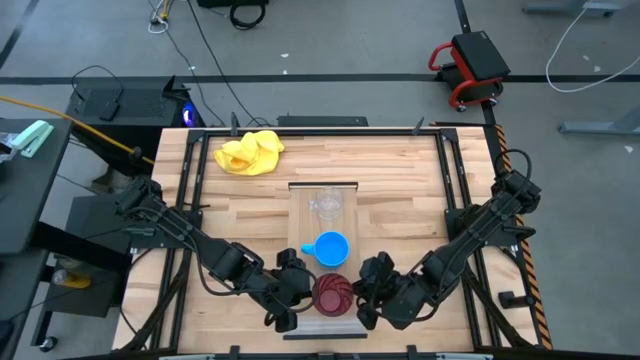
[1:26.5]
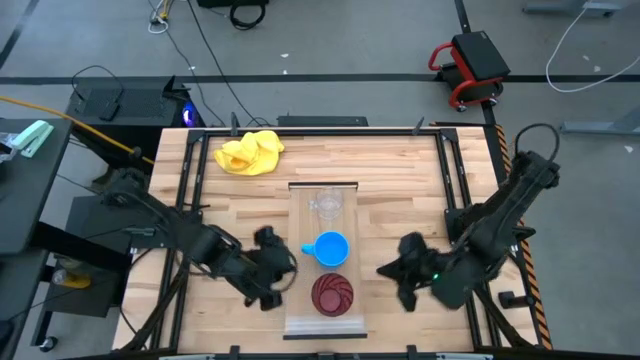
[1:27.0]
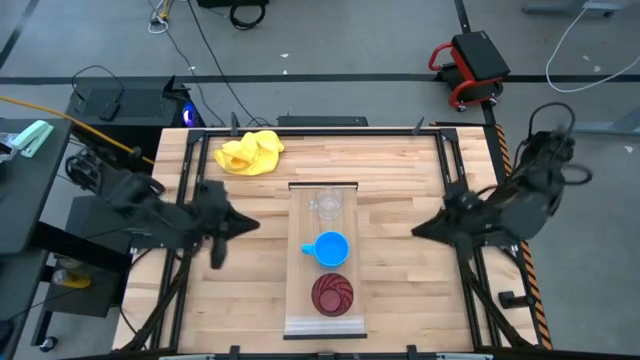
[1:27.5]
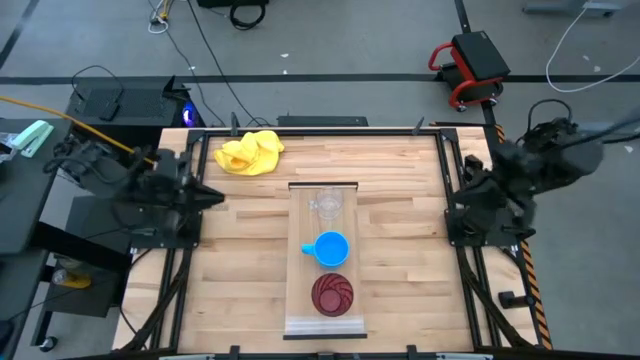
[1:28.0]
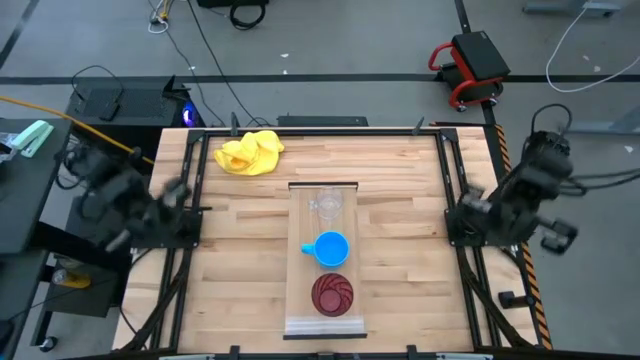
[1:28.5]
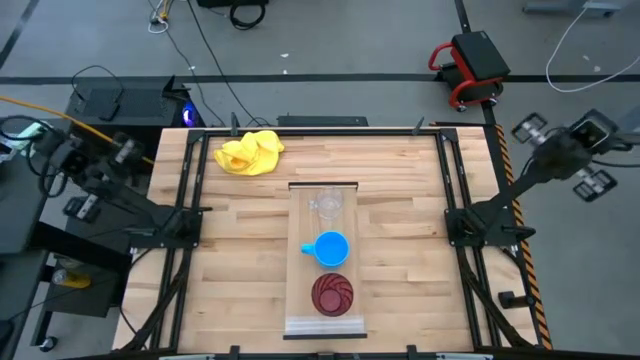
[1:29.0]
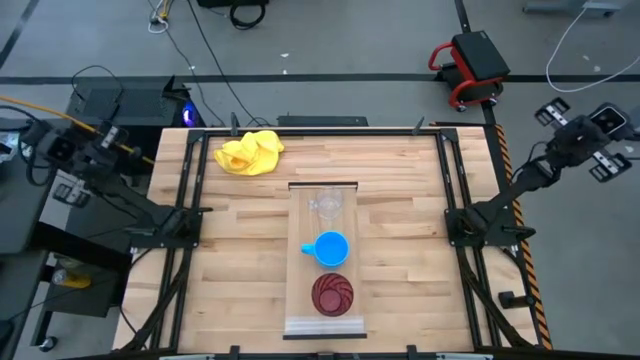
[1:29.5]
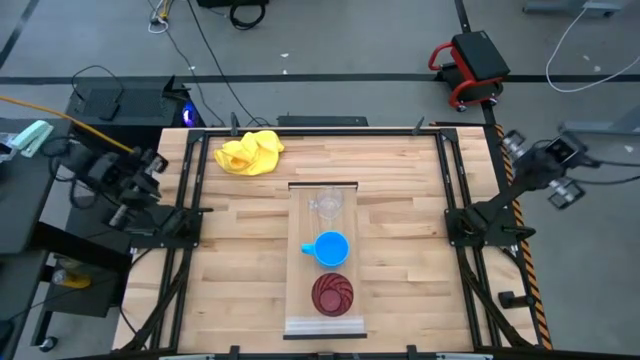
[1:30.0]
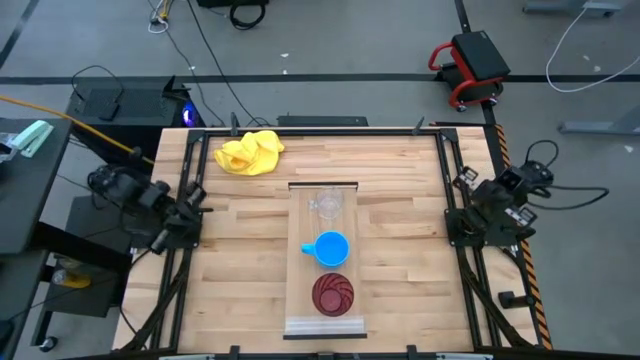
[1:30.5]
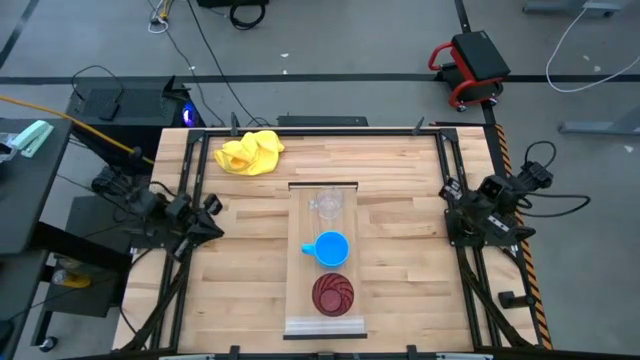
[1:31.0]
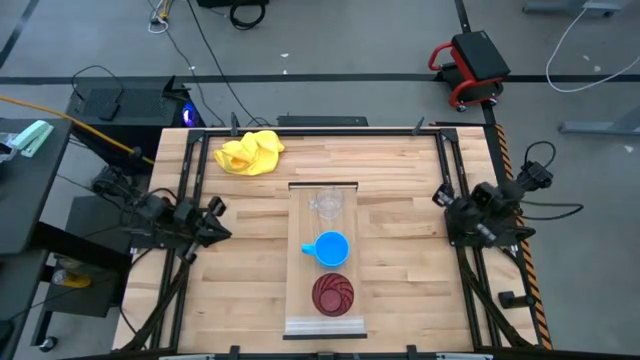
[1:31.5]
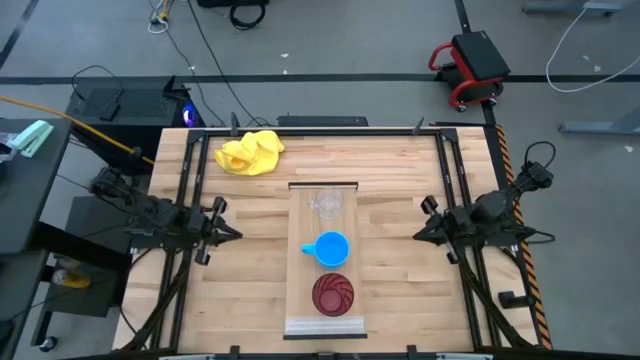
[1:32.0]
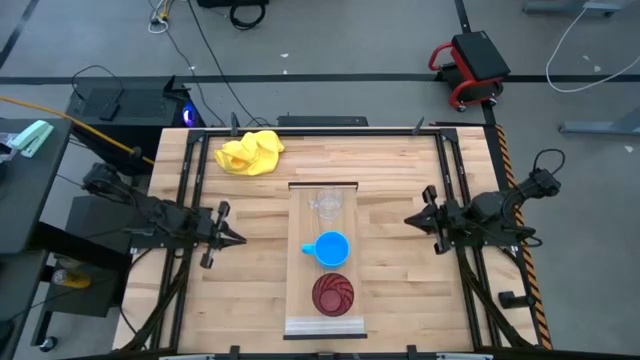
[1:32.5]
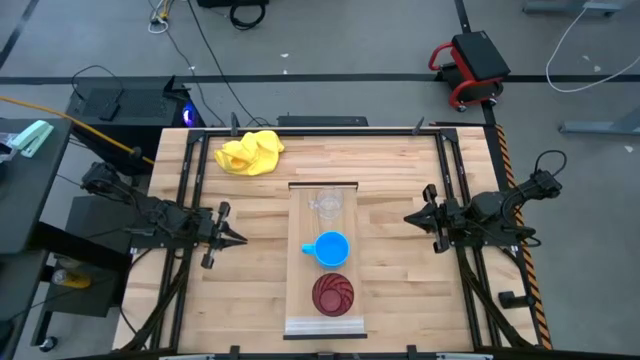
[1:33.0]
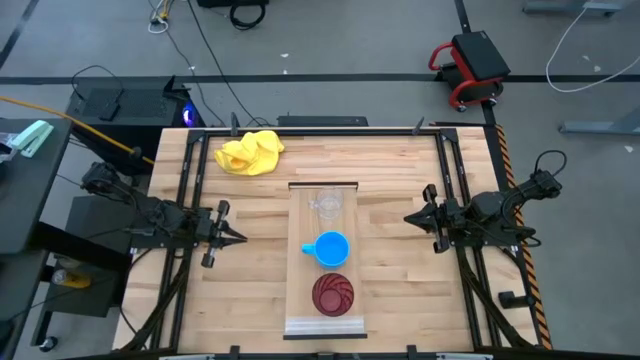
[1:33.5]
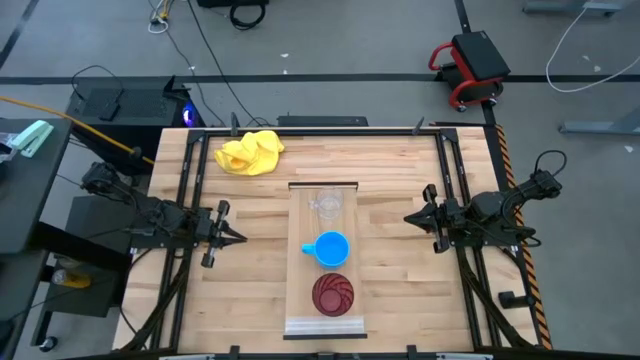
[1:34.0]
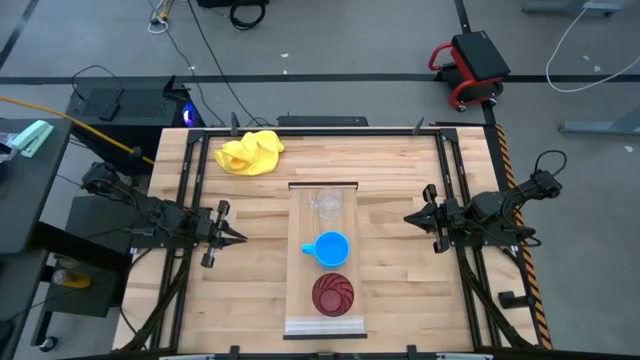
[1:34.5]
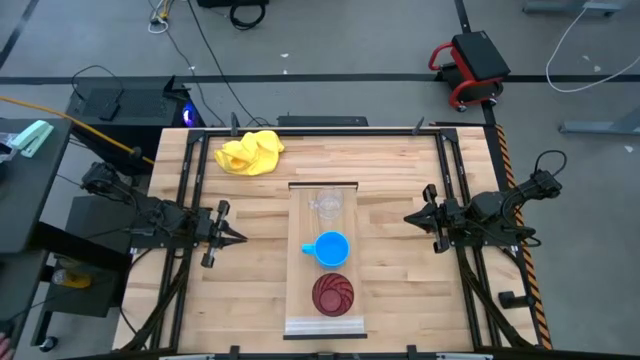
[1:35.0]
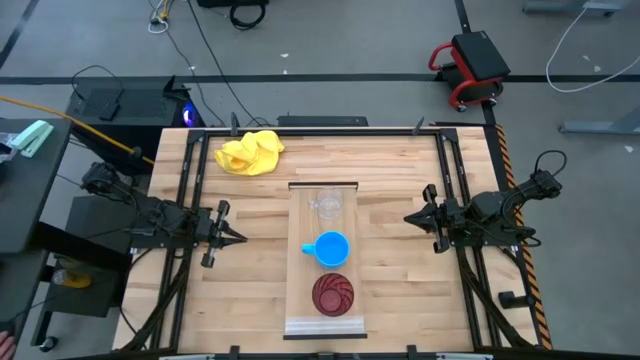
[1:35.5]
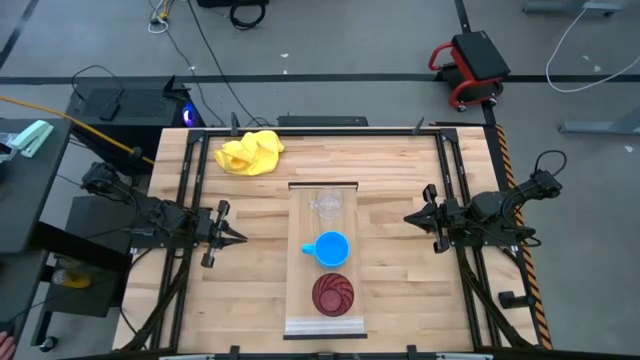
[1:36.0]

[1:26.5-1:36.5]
Task: Stack small to large cups/mugs on shelf
Return to Home Position

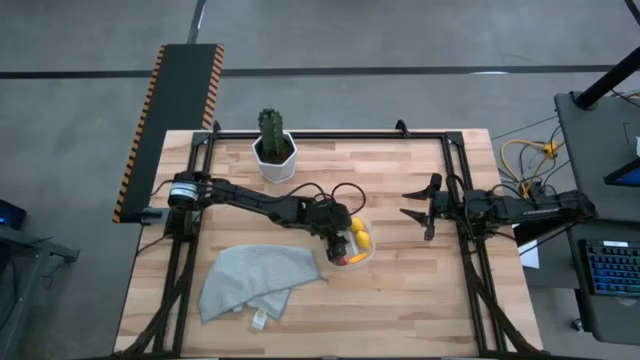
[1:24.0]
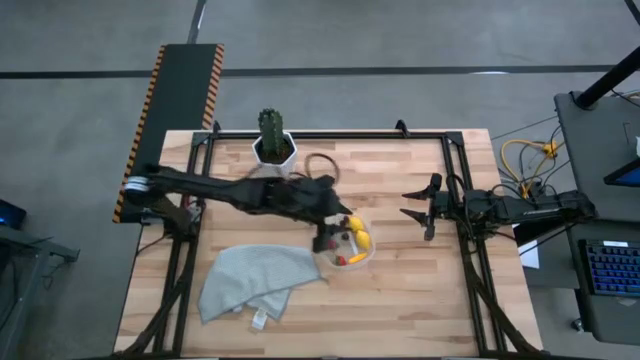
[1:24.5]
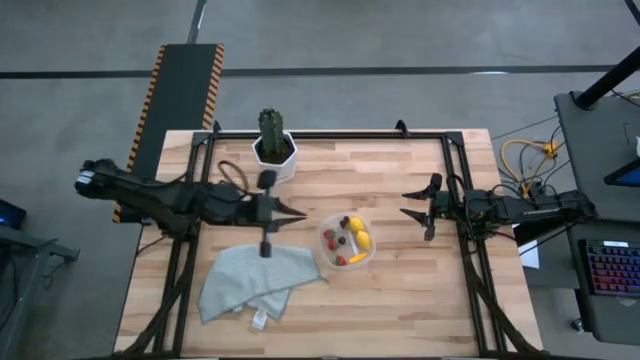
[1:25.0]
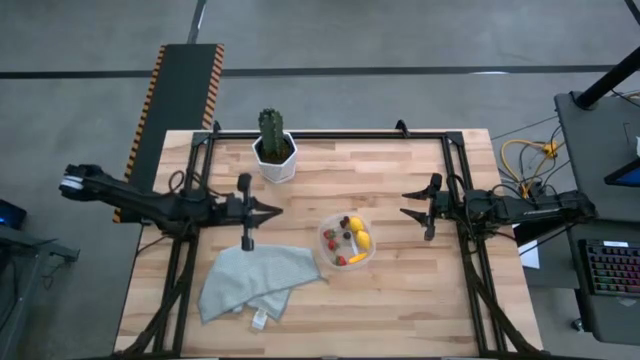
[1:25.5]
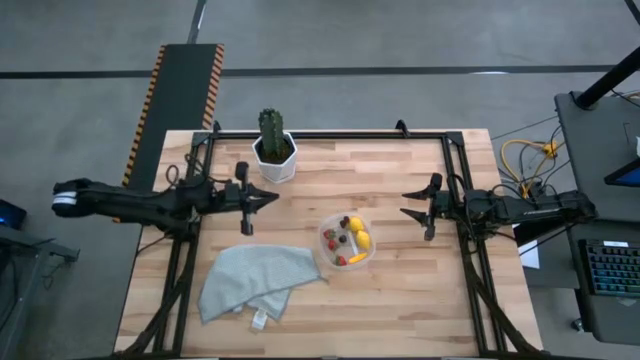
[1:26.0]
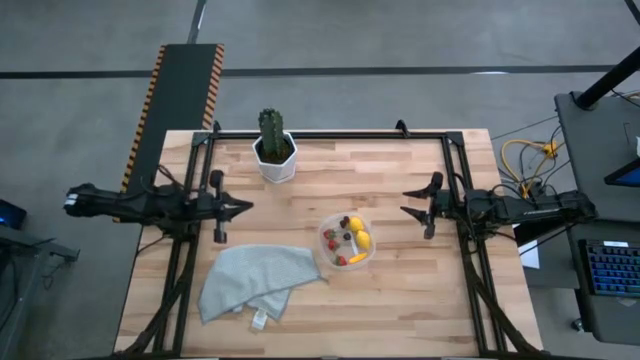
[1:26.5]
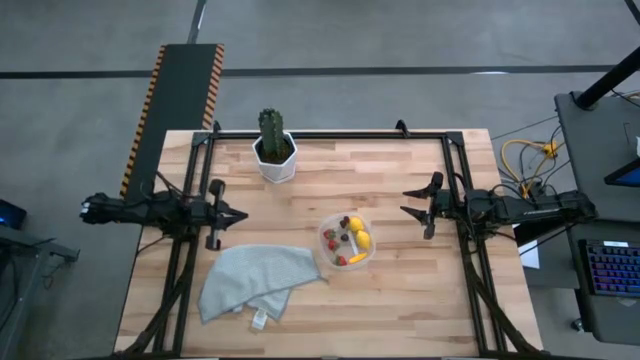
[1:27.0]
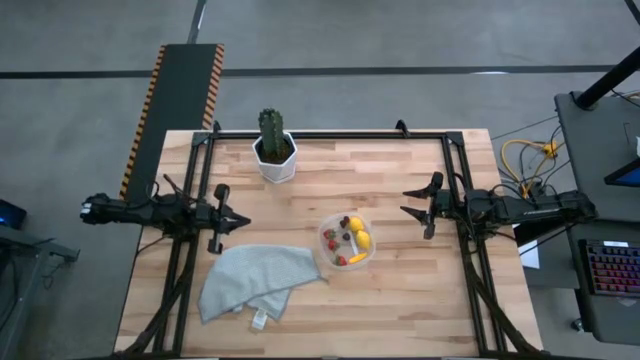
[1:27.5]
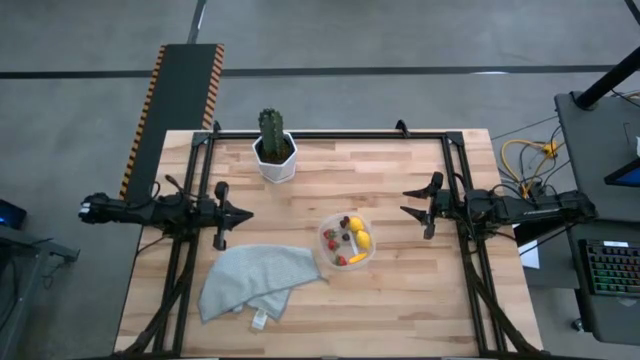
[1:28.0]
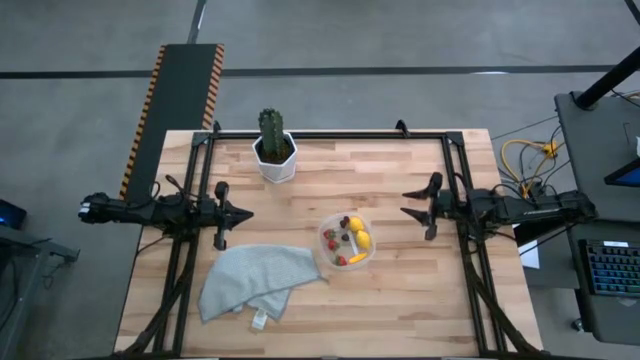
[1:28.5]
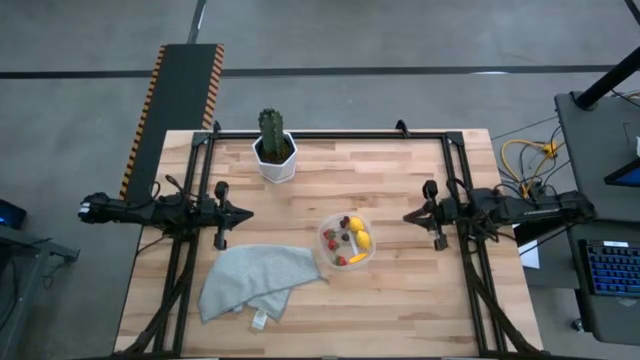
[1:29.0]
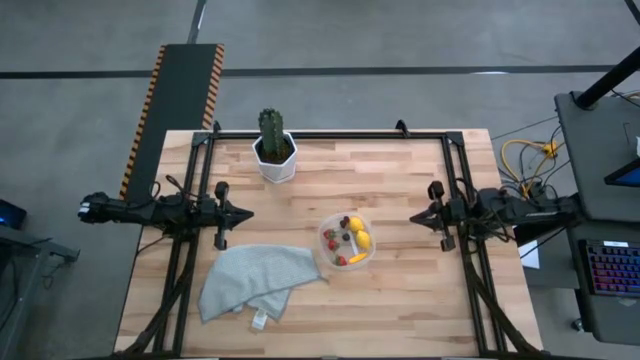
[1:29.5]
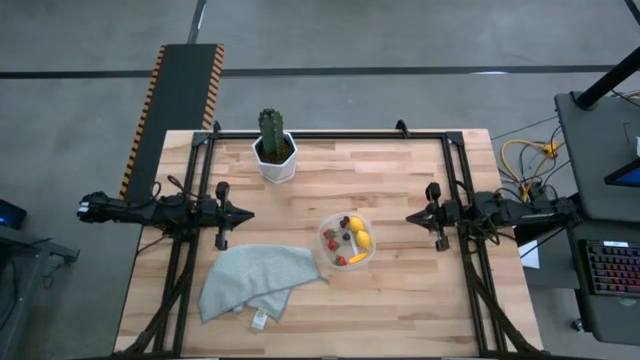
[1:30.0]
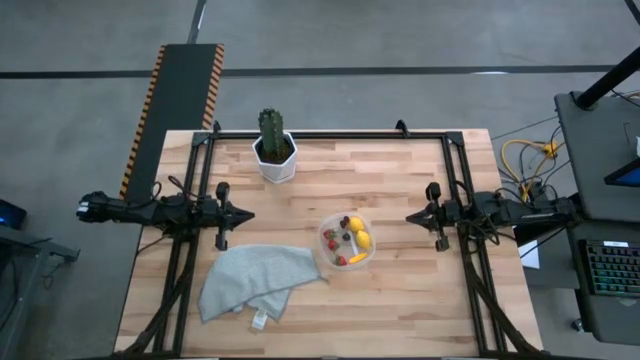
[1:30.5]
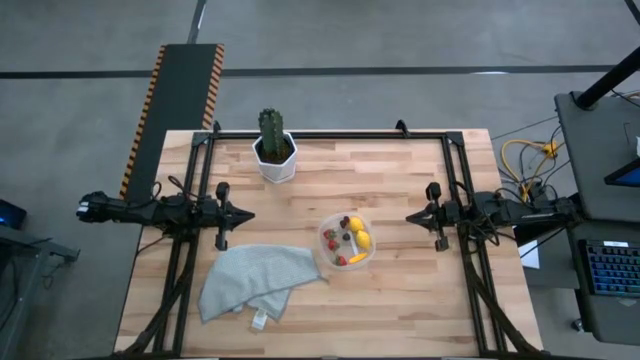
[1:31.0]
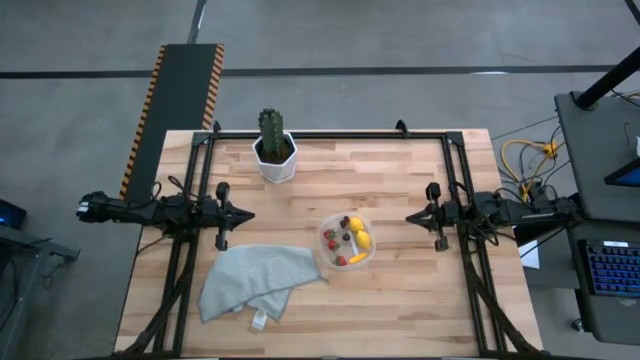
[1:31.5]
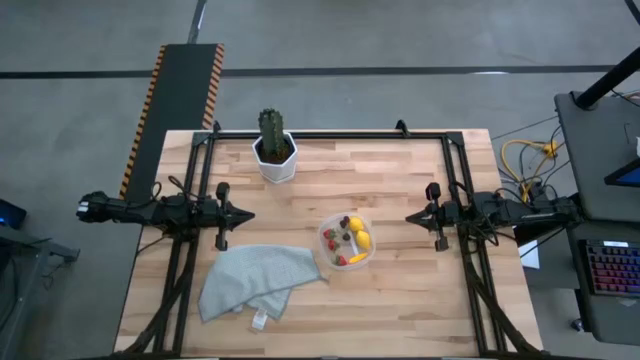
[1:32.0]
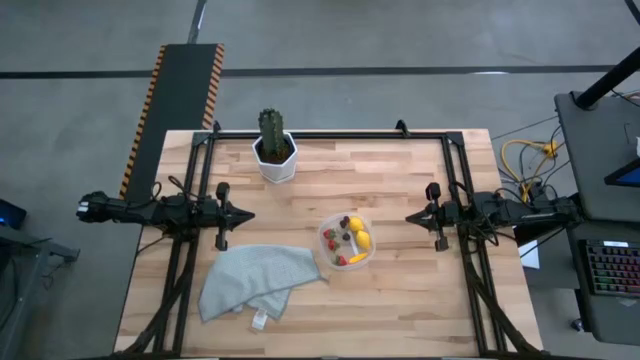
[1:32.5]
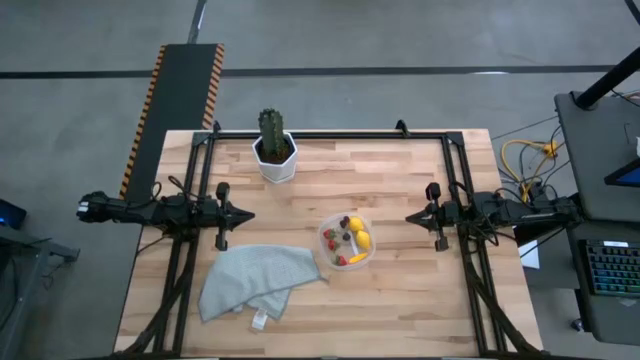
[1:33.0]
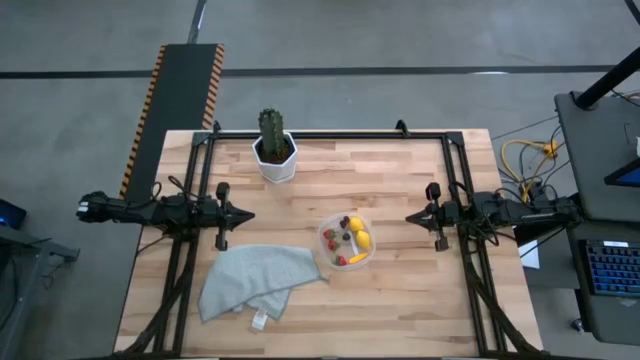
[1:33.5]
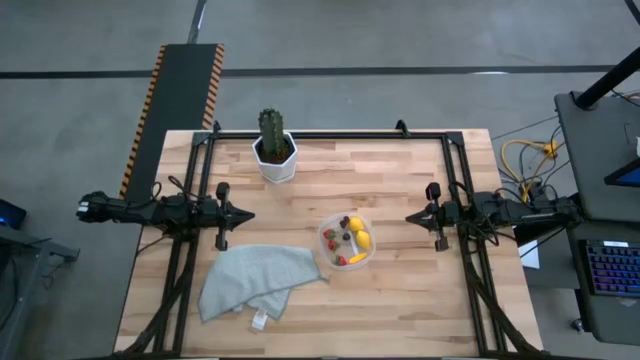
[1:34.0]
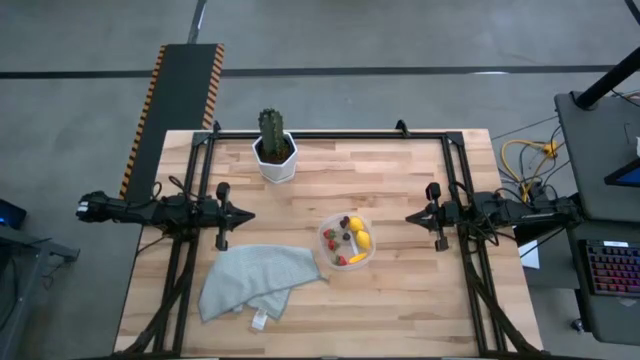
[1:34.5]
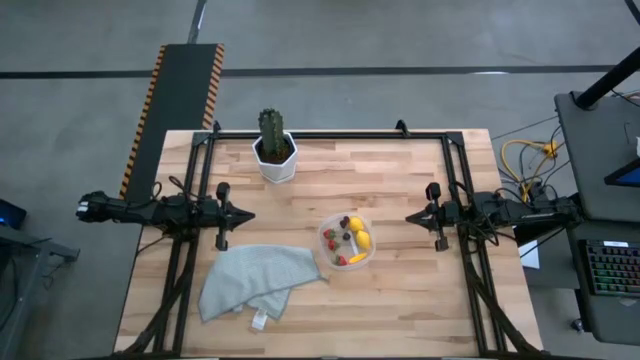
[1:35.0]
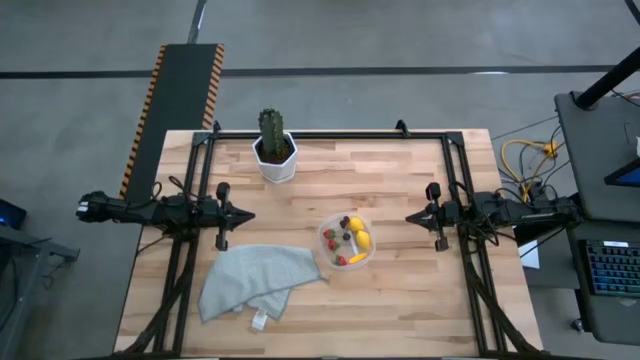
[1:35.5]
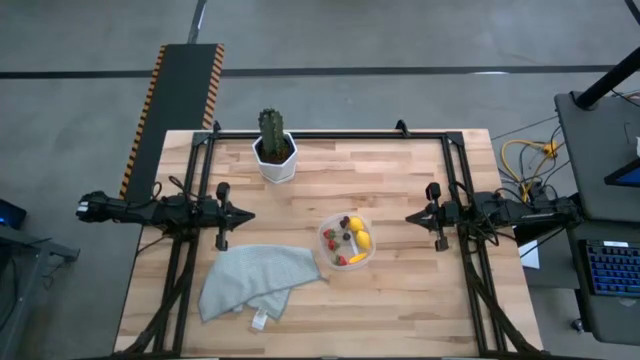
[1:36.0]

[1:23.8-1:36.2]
Task: Pick and placing Produce into tupperware
Return to Home Position
